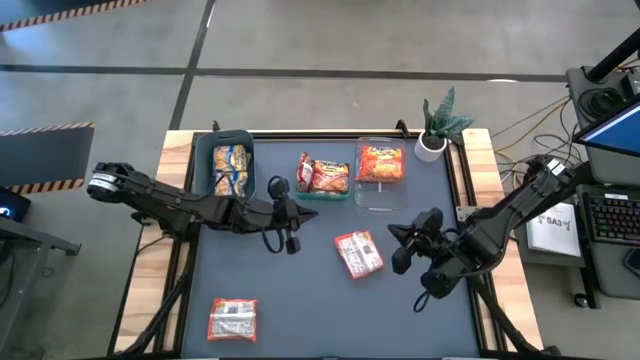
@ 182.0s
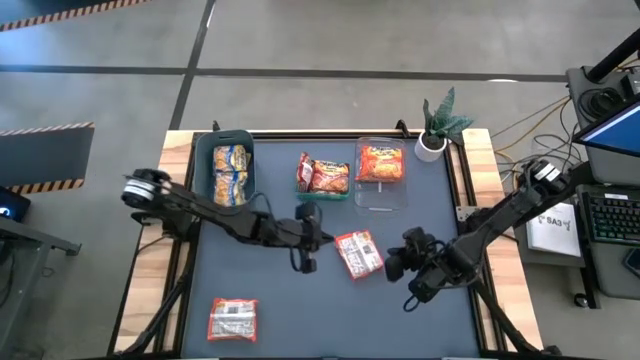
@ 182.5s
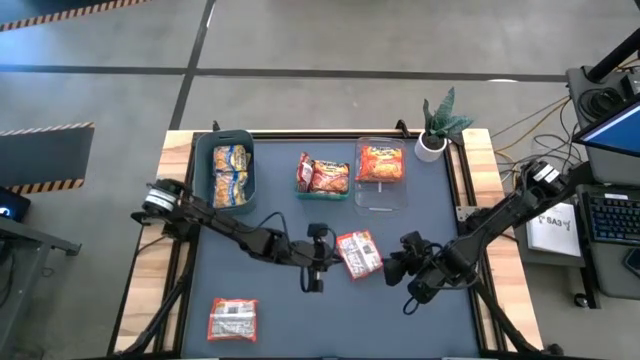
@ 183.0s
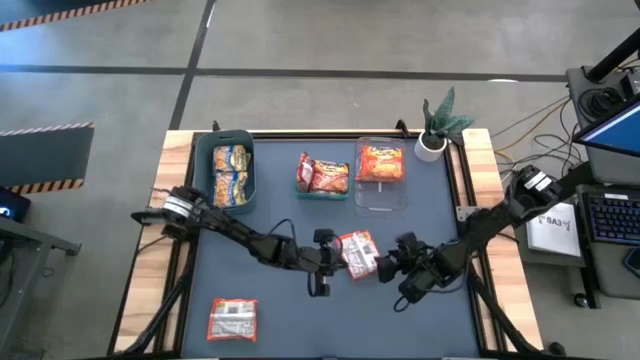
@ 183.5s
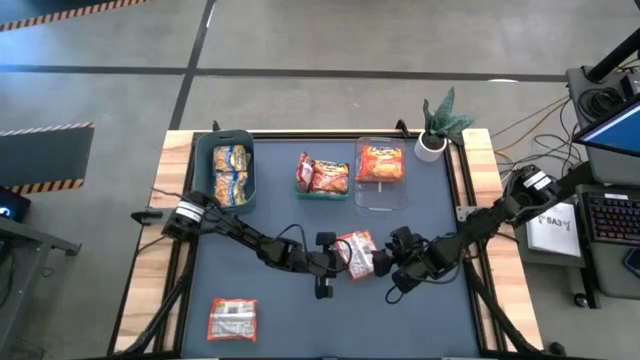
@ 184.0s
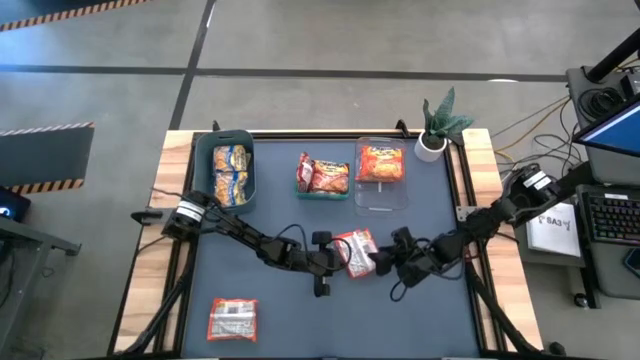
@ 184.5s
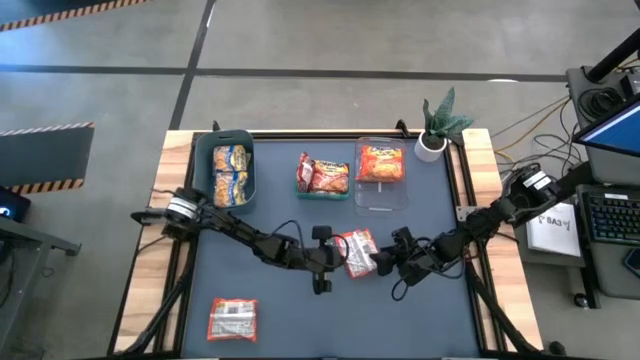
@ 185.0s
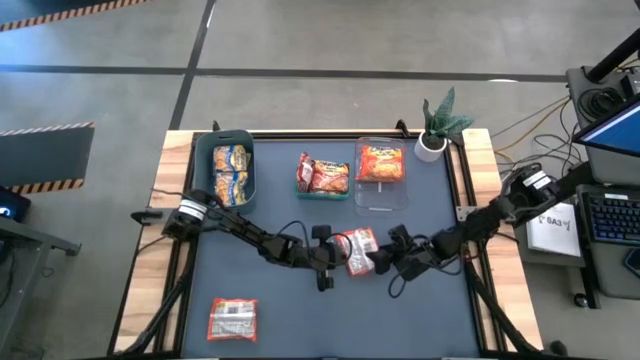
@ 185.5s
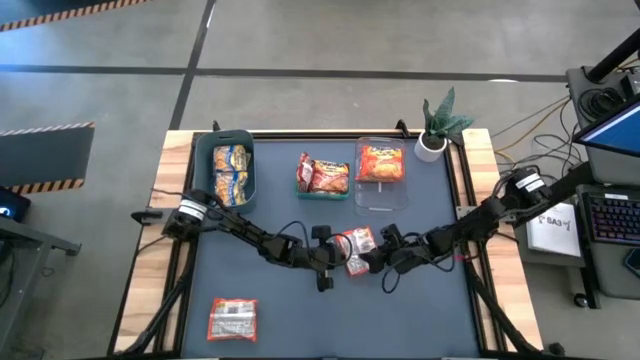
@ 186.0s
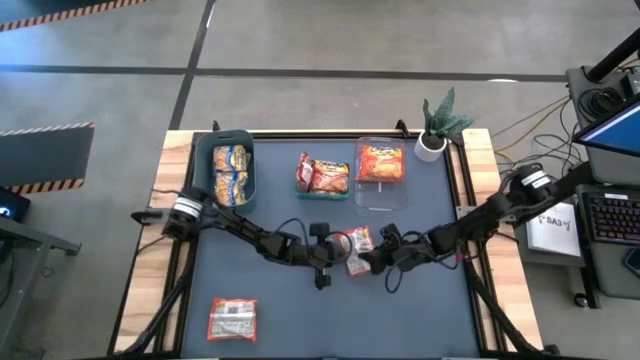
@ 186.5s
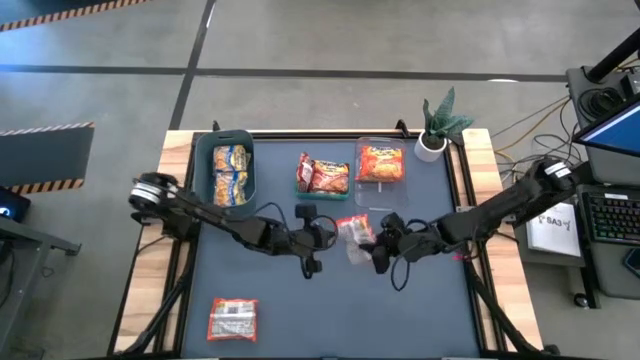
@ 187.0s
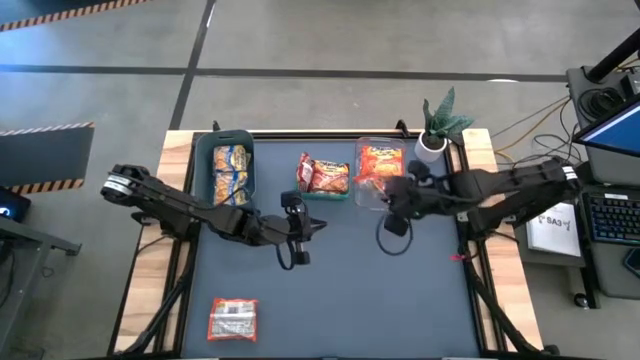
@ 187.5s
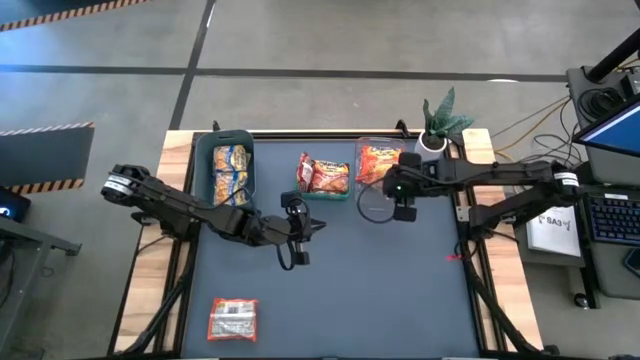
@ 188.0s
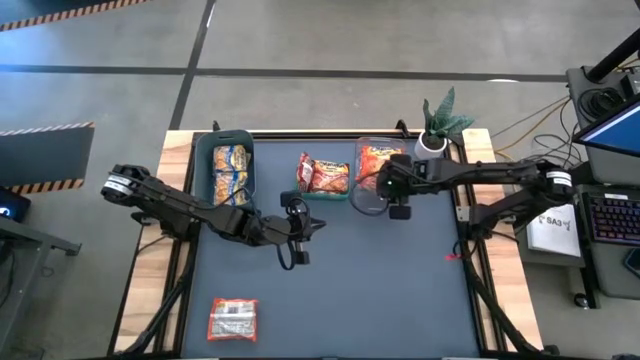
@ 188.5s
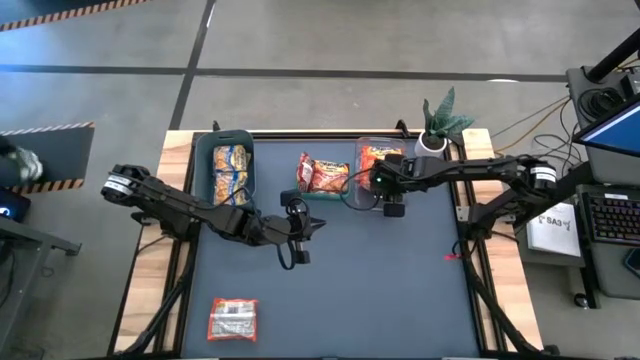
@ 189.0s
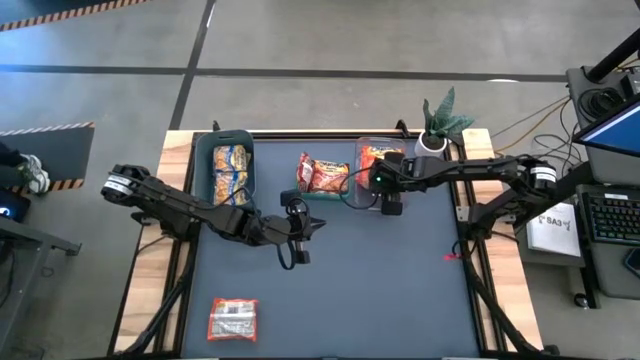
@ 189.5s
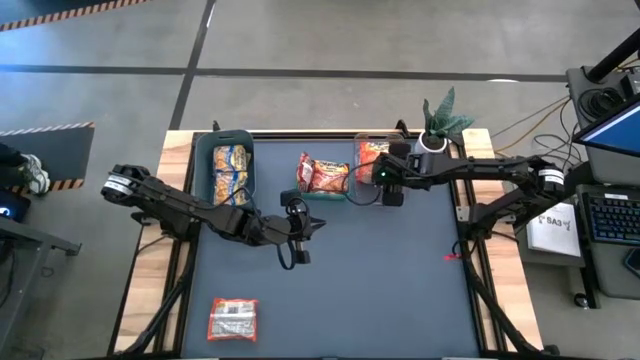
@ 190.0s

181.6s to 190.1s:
Task: Sort Maruchan noodles
Put the right orange noodle pack into the transparent bin

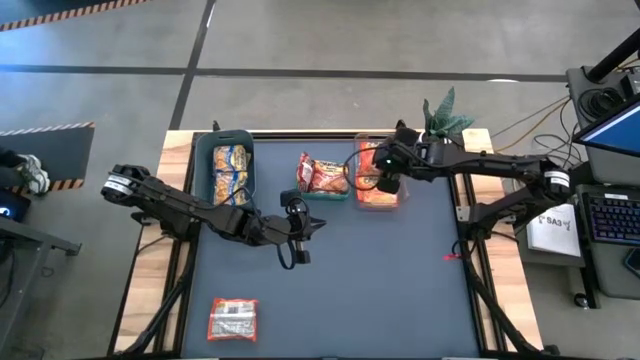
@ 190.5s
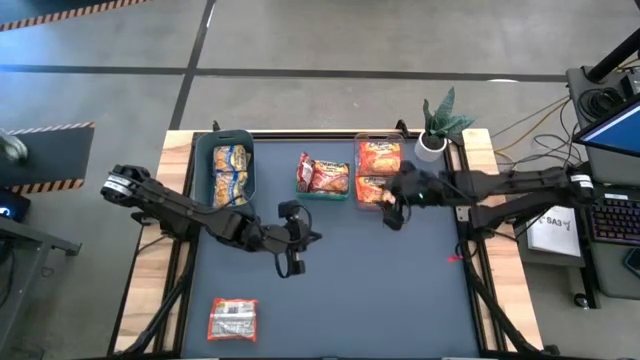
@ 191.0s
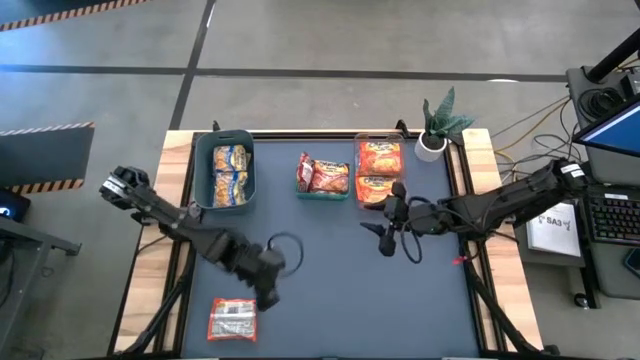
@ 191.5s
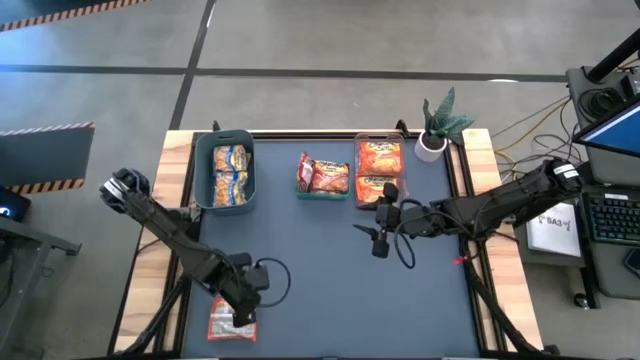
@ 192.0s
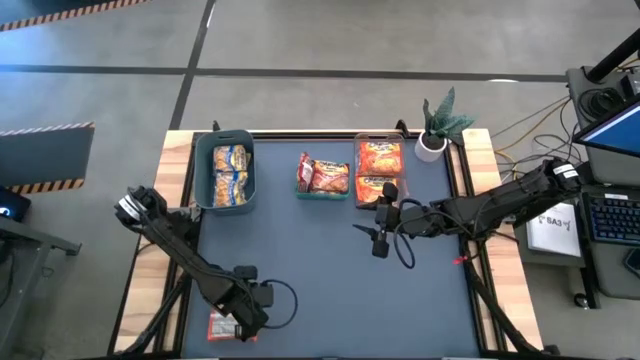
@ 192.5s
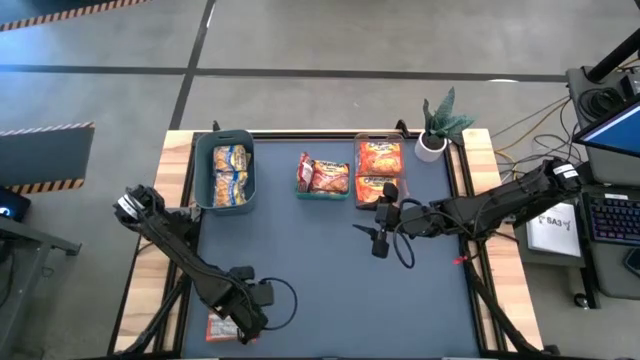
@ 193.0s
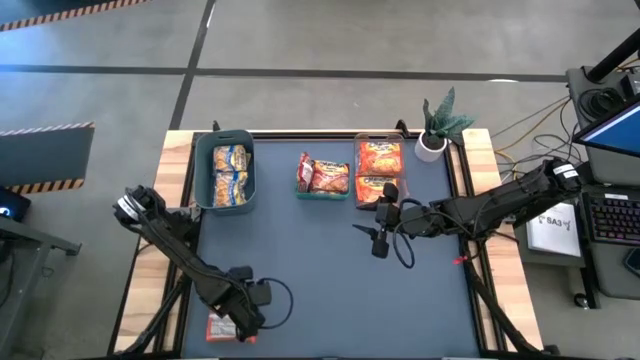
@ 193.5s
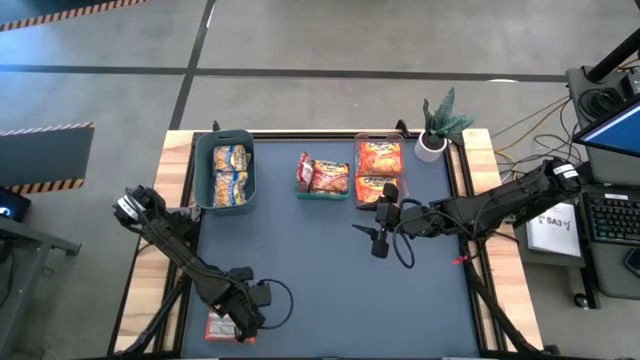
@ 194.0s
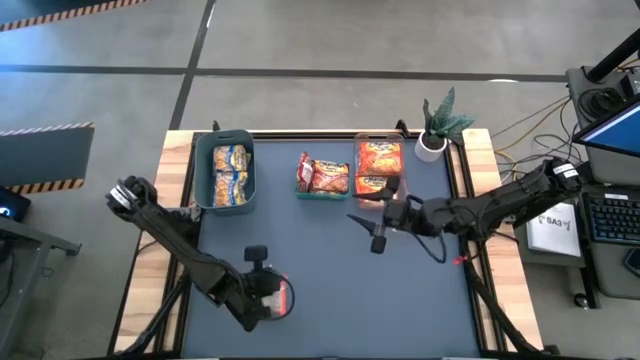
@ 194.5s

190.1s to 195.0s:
Put the orange noodle pack into the transparent bin

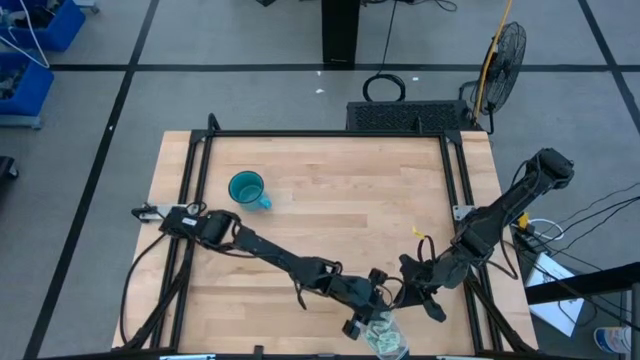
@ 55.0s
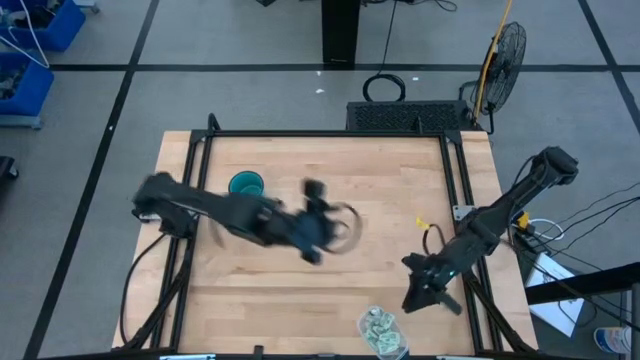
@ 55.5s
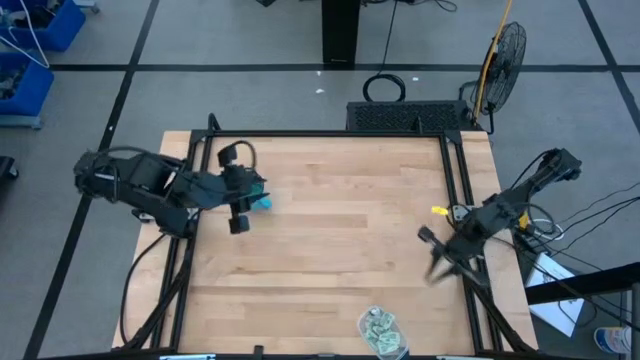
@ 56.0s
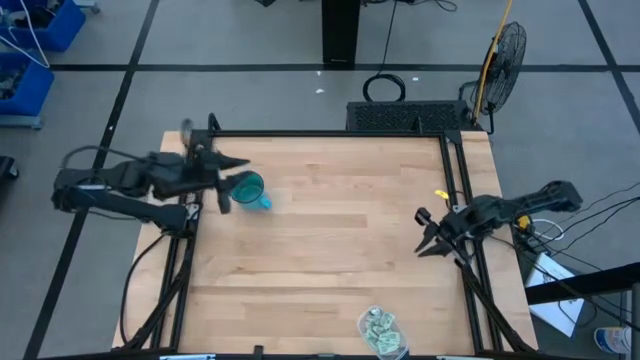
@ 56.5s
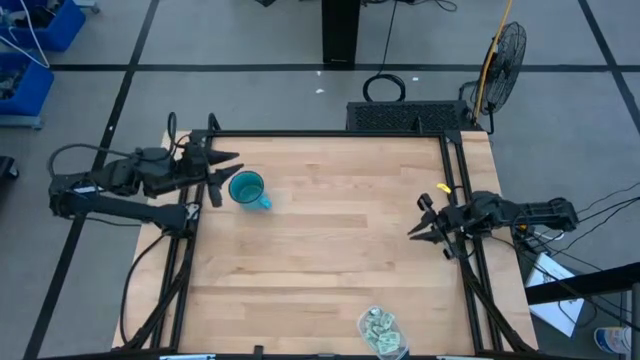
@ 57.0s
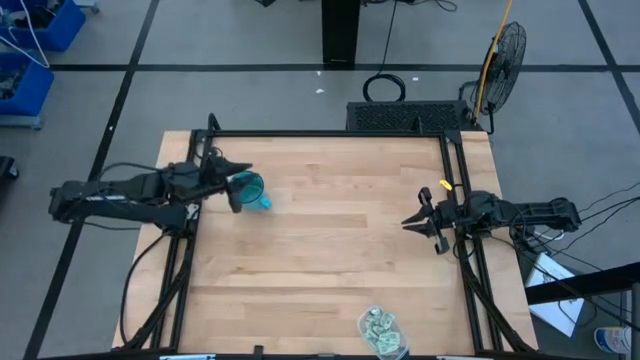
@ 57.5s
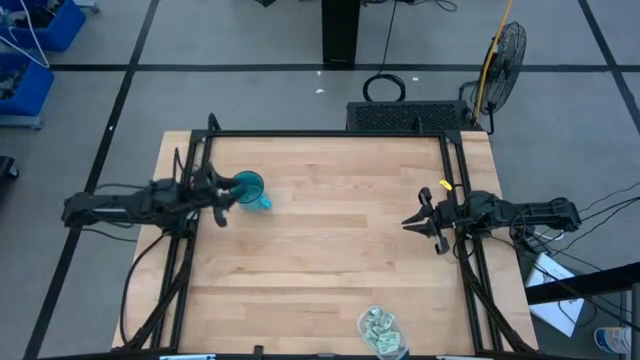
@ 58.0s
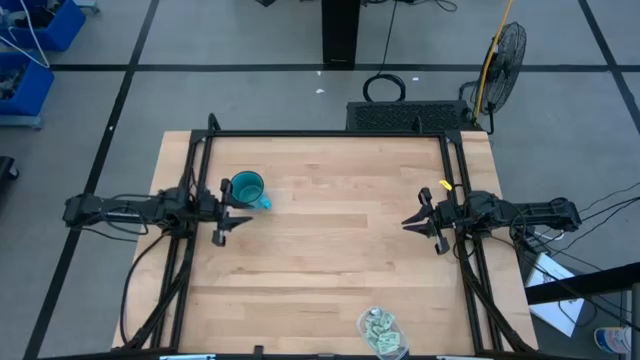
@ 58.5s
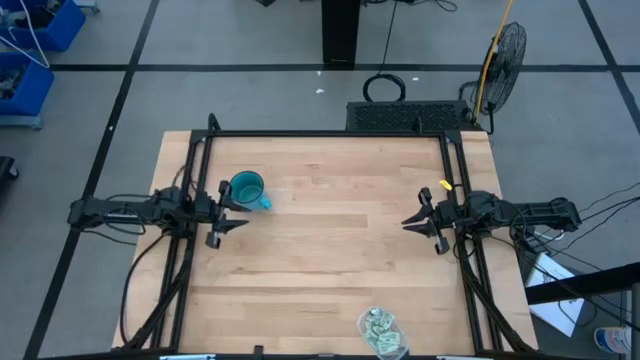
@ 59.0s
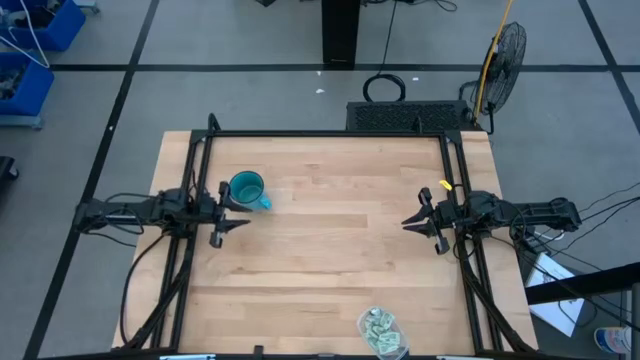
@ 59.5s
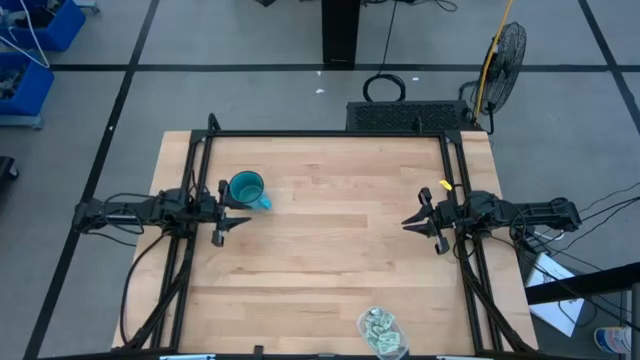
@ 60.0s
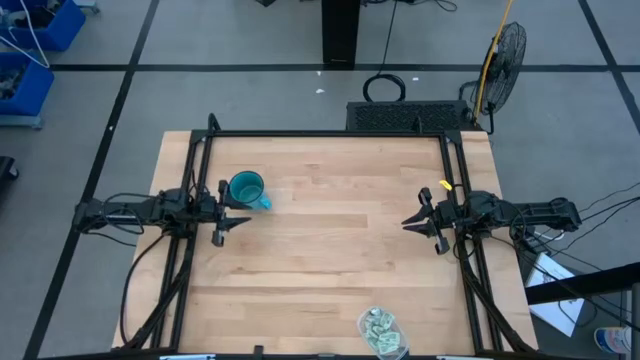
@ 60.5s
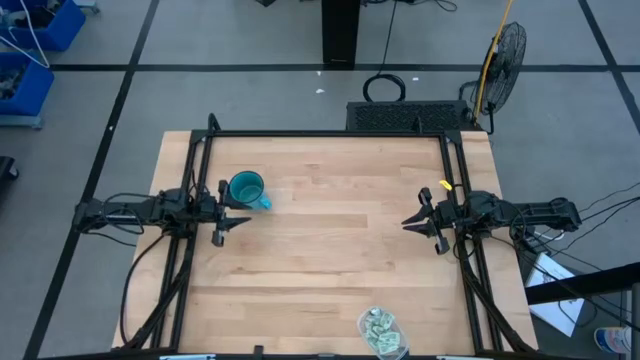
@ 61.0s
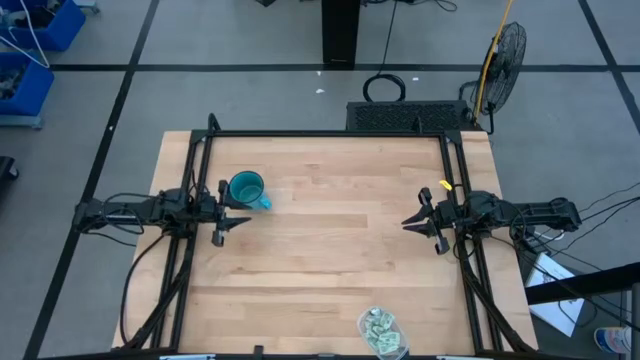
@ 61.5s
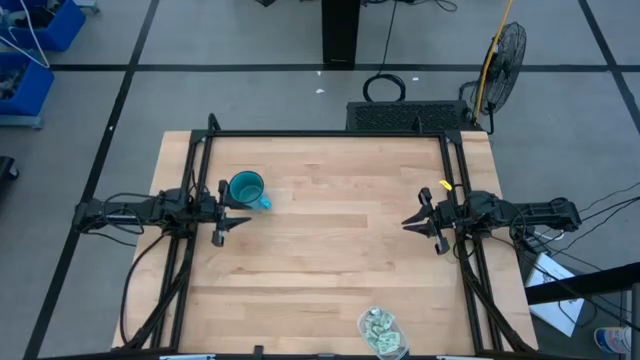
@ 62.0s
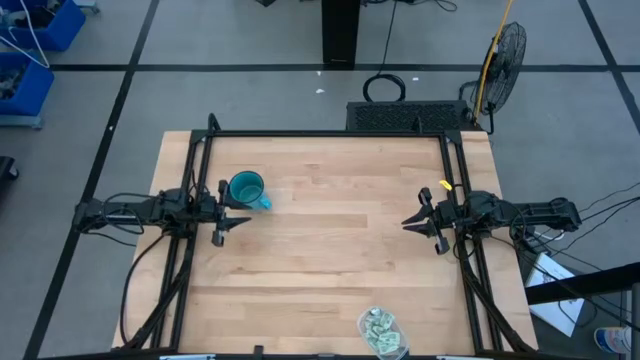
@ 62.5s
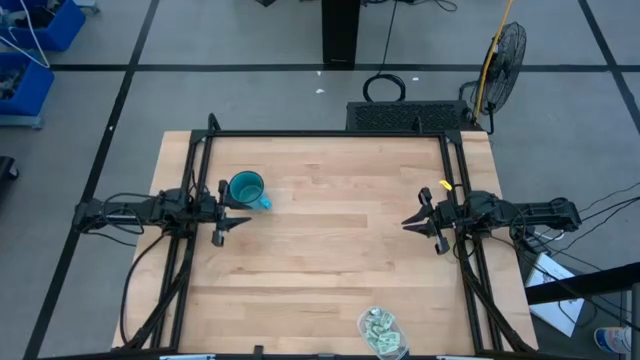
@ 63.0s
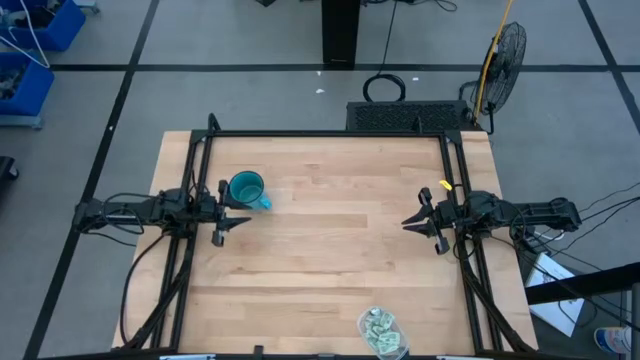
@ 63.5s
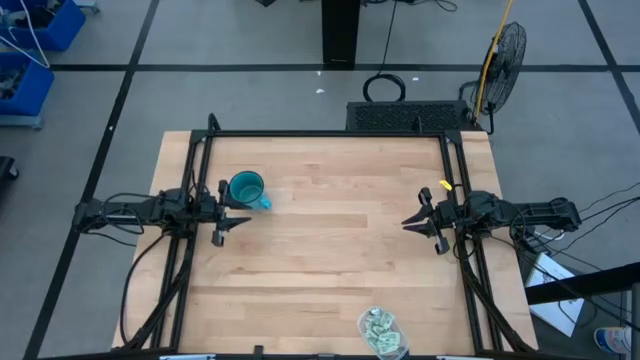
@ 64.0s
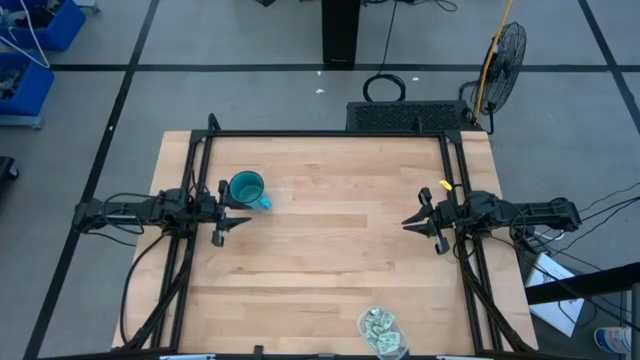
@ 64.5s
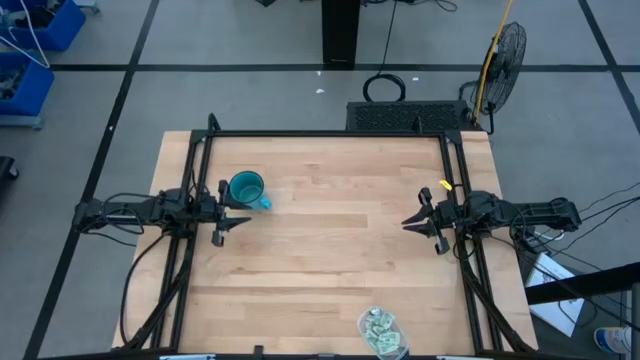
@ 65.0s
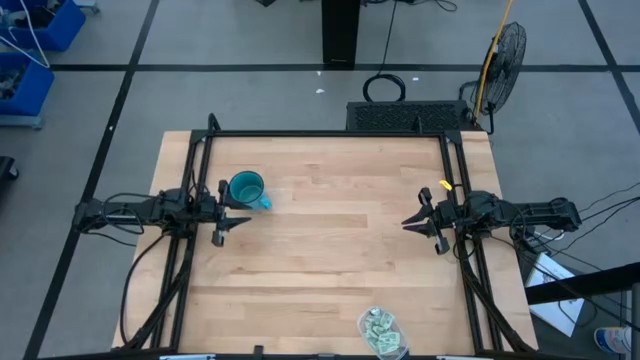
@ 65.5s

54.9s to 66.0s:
Task: Pick and place Stevia / Truvia into bins
Return to Home Position
